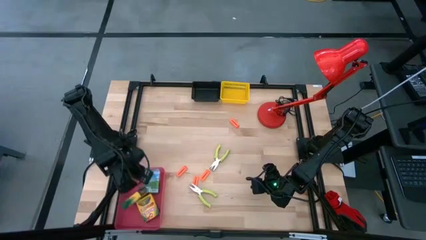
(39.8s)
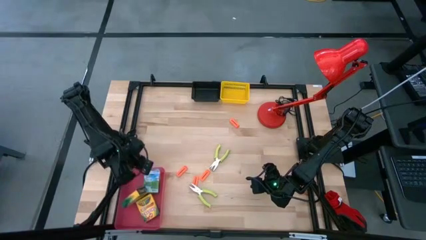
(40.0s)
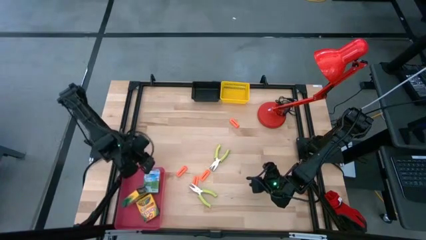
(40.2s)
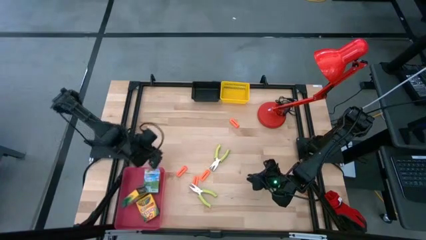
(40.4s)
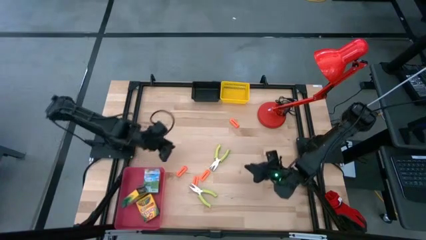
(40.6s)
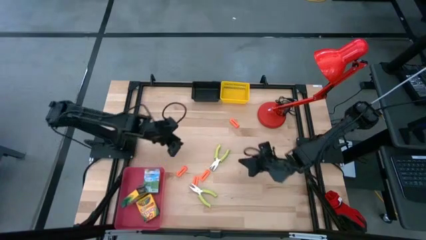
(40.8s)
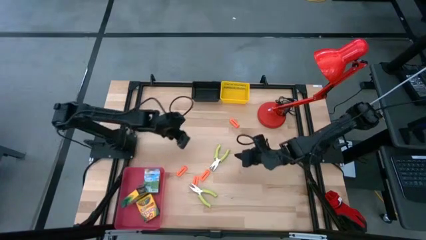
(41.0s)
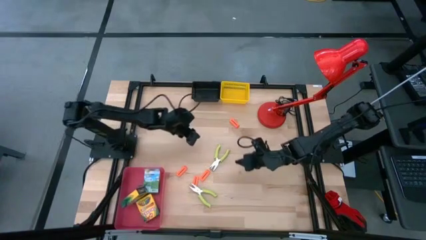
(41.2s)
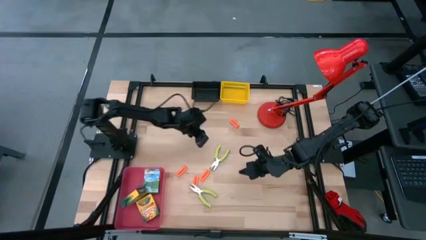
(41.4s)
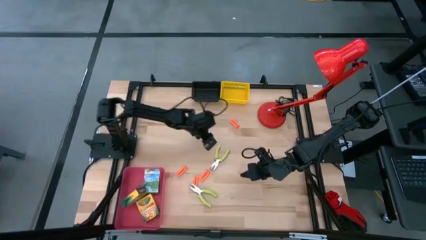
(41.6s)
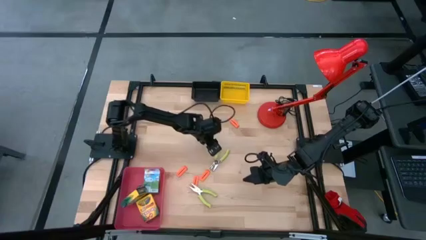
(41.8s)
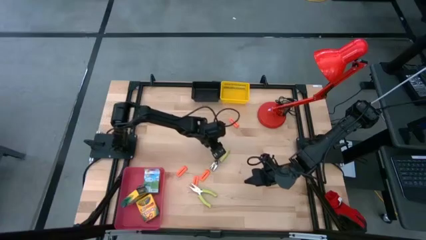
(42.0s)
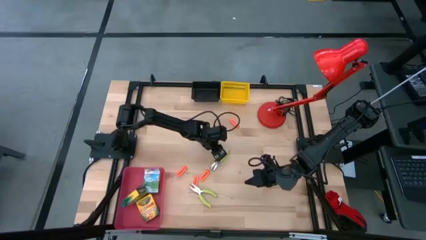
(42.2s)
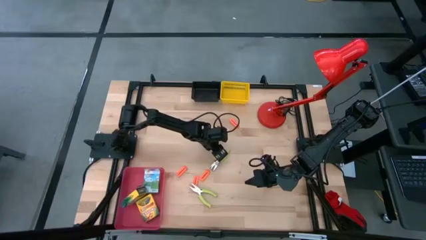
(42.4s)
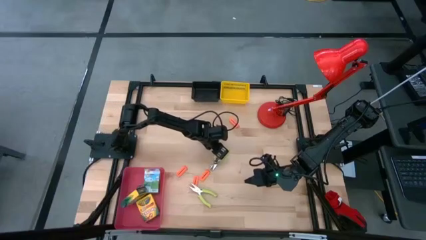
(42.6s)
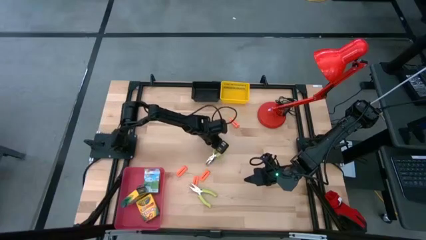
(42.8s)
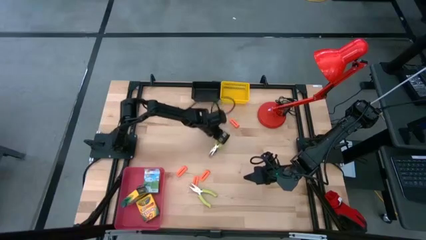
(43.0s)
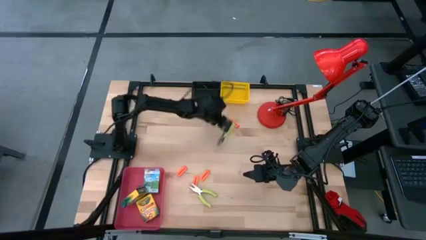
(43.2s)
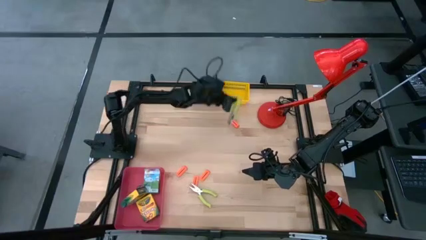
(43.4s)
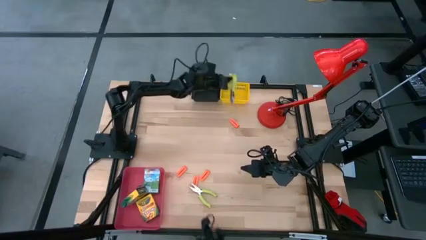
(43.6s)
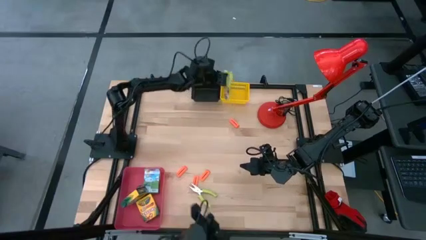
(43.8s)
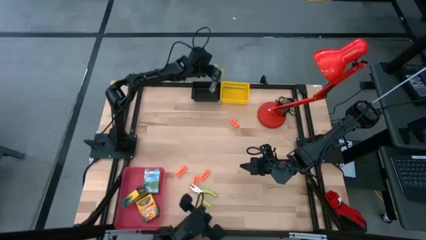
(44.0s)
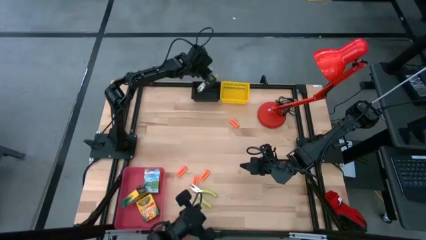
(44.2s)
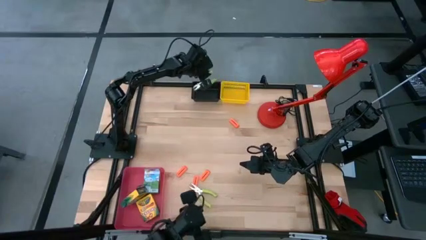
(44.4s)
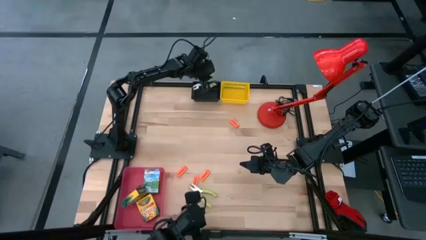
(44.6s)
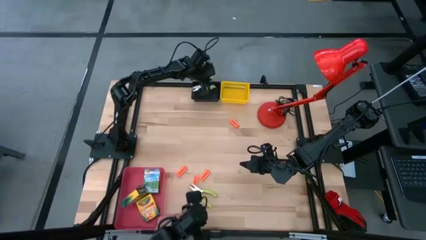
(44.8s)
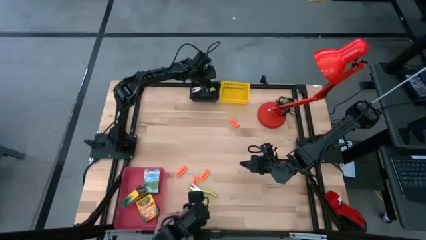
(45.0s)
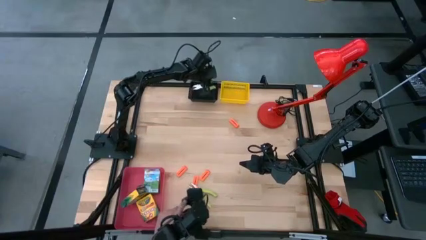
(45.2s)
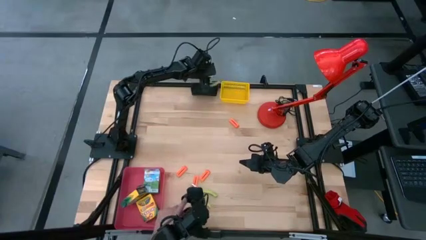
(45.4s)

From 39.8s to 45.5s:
Task: Pick & Place School Supplies
Put the green ticket punch into the black bin

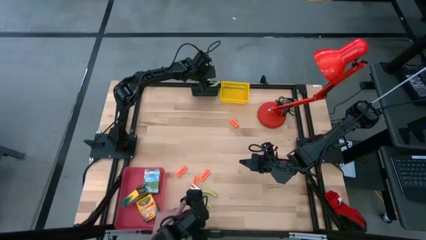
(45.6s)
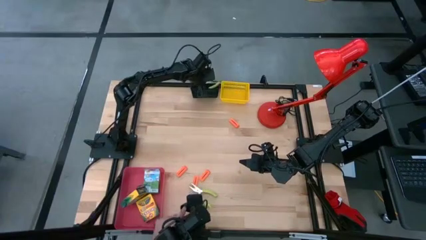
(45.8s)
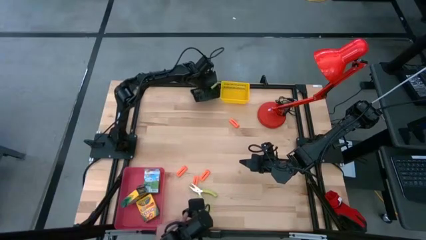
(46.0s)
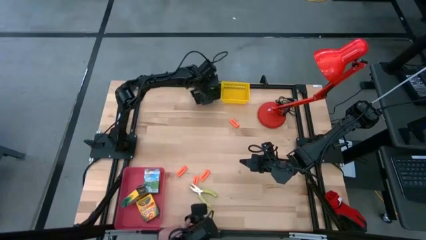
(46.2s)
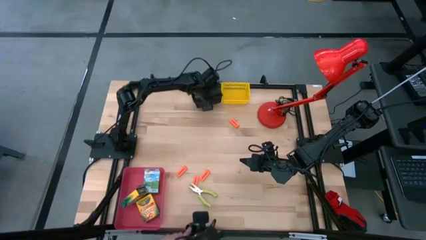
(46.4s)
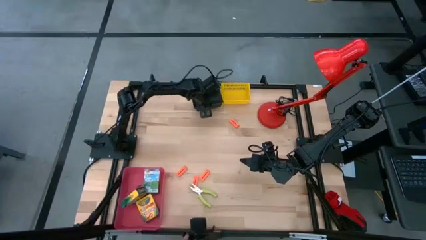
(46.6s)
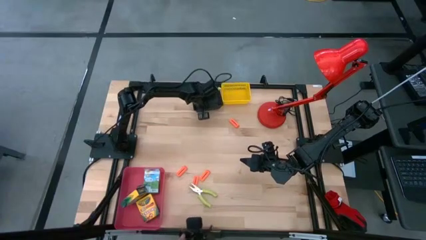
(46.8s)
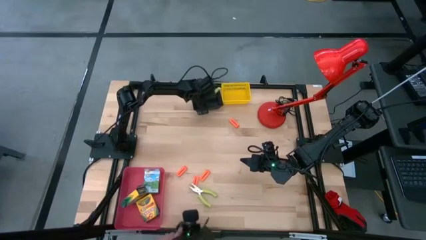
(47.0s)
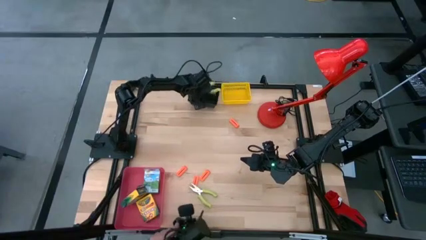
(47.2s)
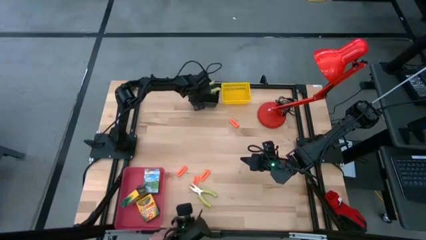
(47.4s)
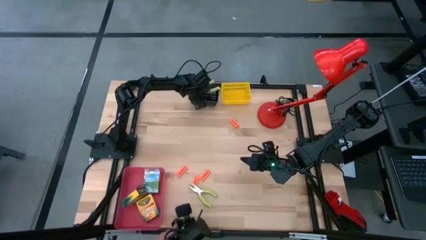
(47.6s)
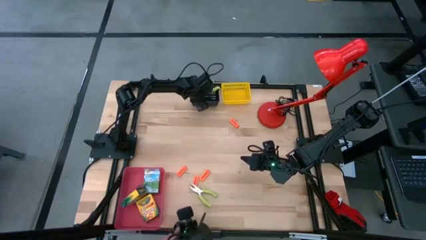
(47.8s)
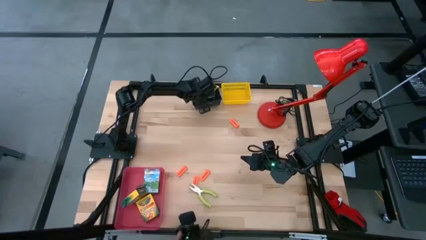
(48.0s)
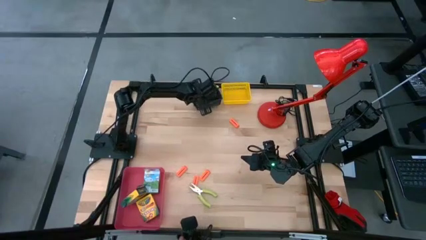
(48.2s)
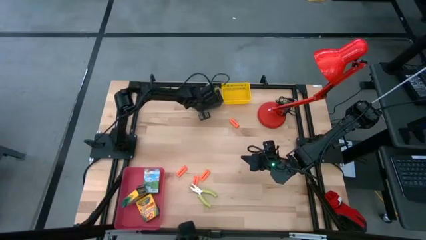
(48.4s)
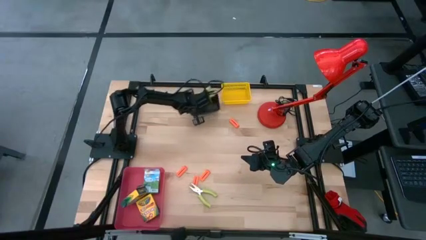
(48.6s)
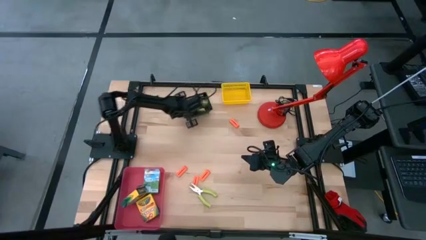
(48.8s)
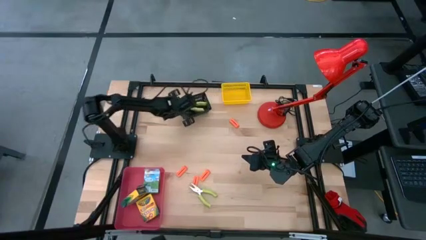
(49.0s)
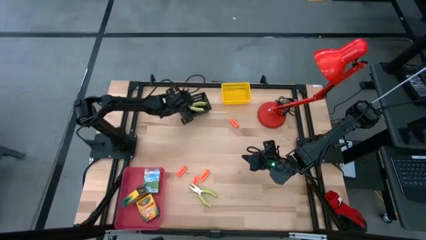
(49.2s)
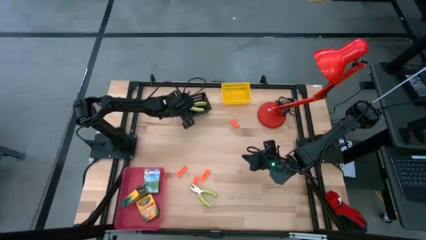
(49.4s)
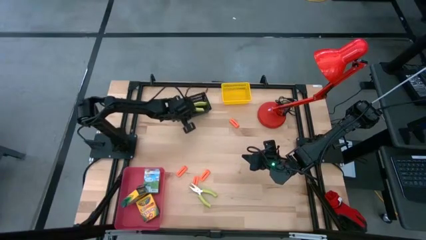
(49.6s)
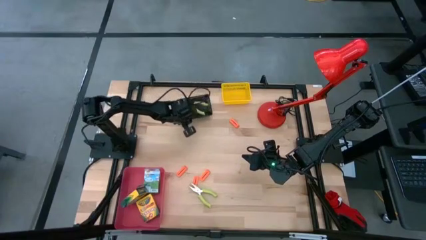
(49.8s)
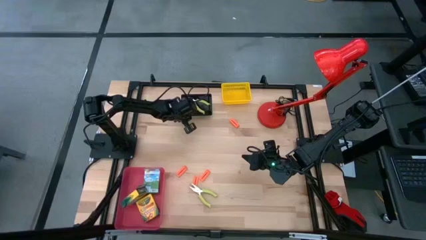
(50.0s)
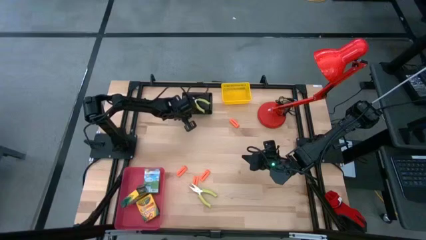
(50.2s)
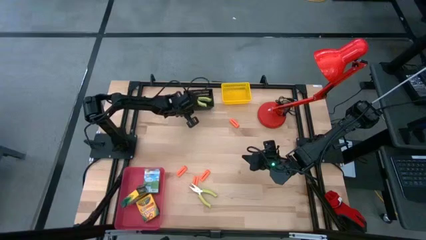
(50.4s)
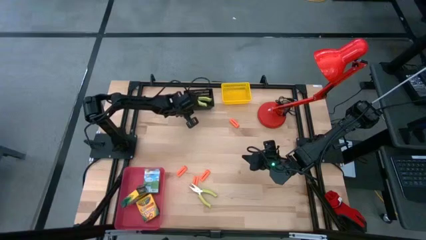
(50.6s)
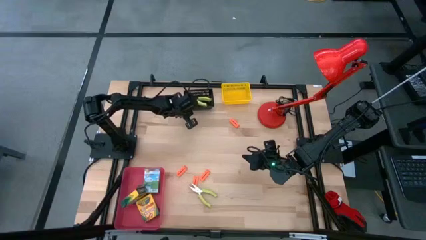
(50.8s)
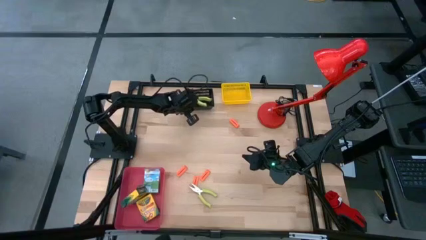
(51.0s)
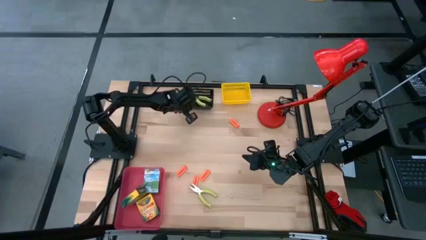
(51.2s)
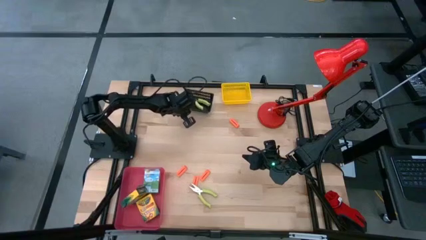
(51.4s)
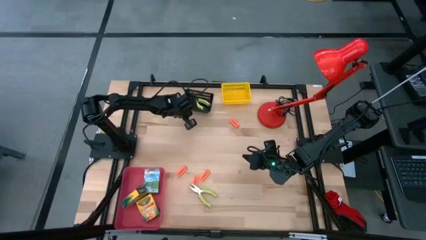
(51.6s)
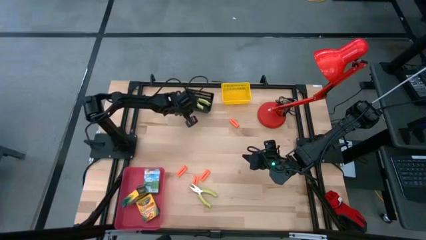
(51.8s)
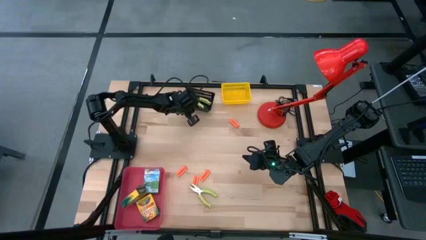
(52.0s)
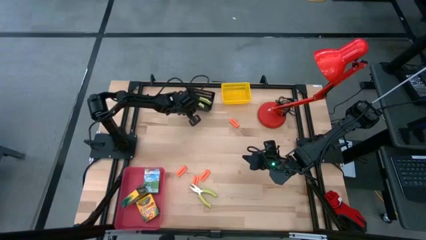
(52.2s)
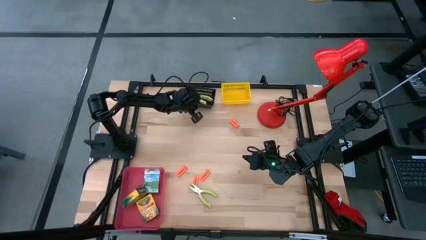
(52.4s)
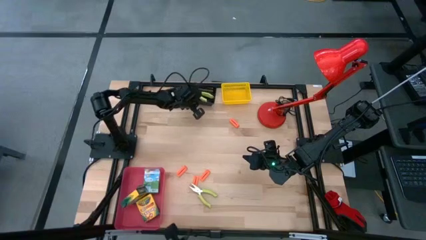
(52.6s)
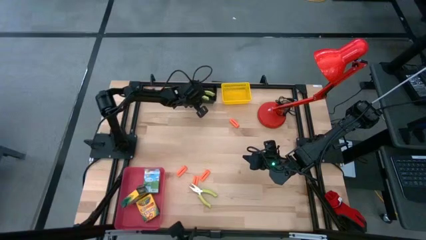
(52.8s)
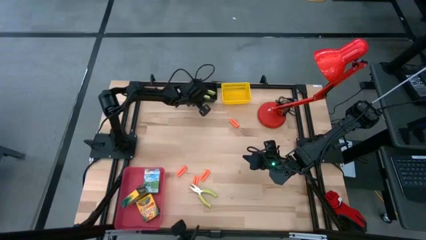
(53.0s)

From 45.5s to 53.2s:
Adjust the black bin

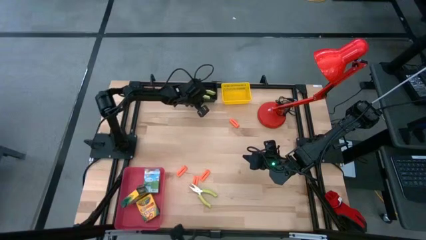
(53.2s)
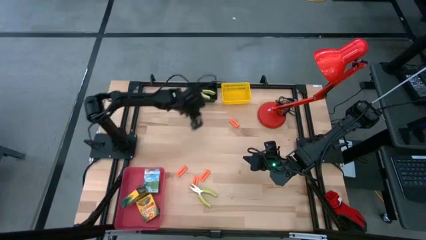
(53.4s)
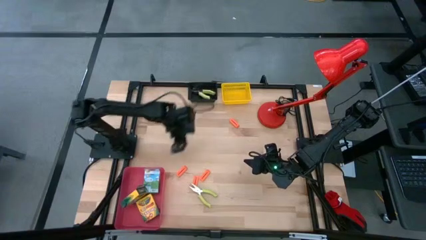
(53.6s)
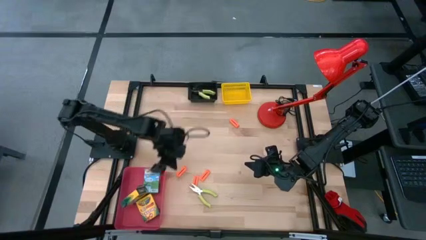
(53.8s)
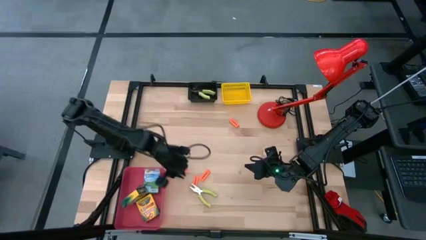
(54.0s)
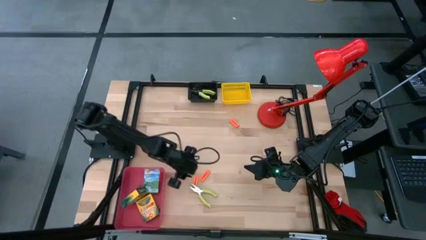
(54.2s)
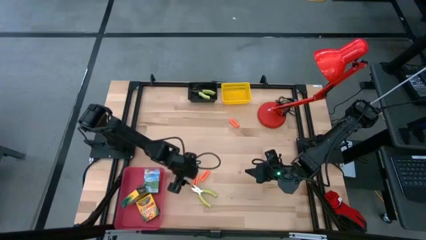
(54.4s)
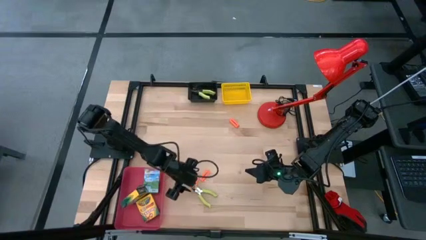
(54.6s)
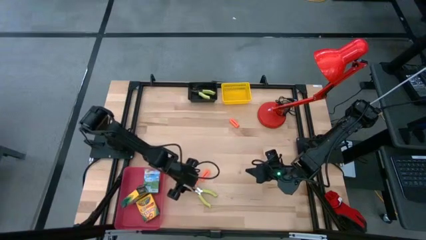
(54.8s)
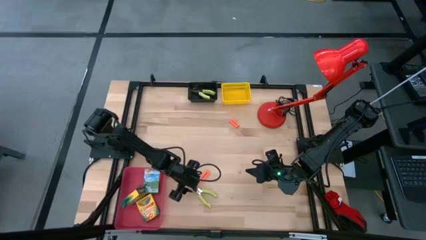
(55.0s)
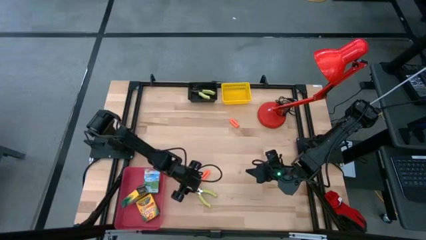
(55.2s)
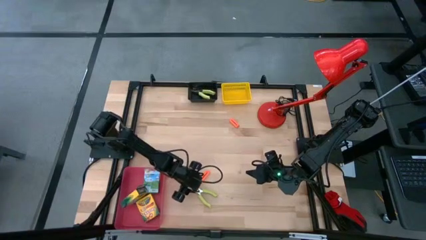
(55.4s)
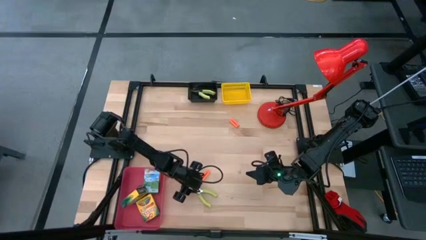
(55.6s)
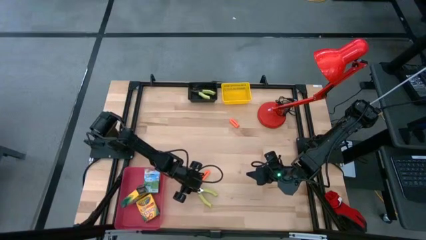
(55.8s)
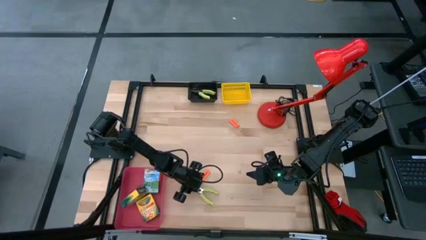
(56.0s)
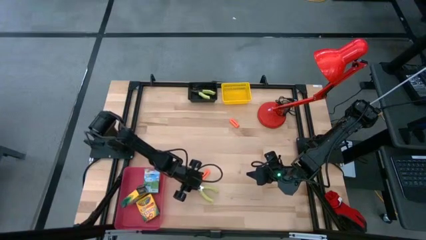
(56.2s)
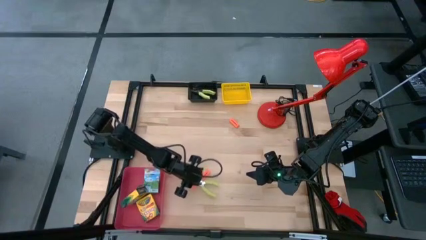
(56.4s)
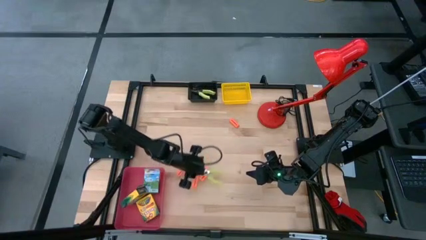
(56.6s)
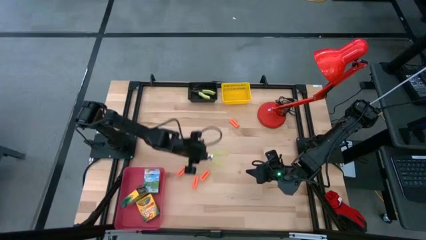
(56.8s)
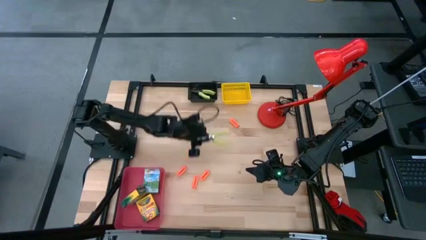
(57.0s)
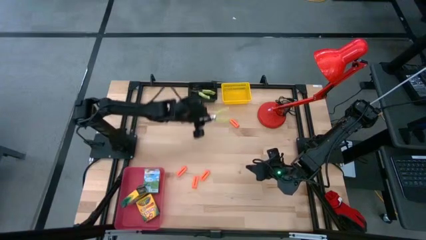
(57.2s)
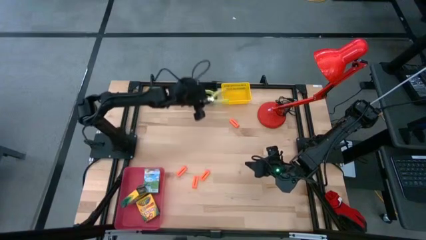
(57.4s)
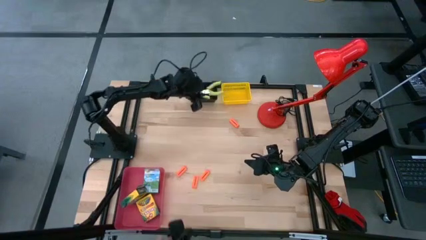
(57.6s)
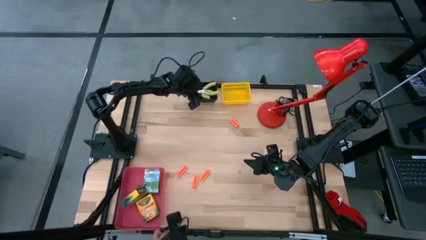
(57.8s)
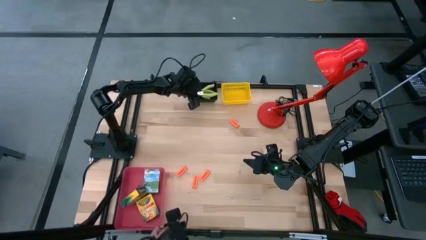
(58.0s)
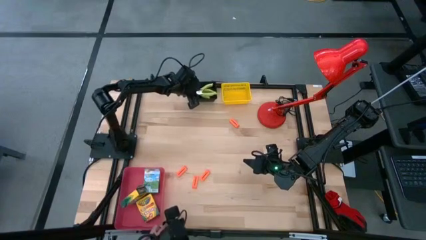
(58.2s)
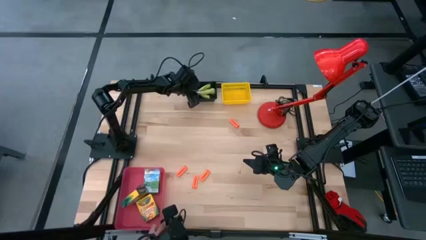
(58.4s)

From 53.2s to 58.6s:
Put the green ticket punch into the black bin
